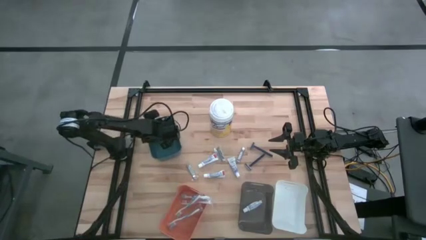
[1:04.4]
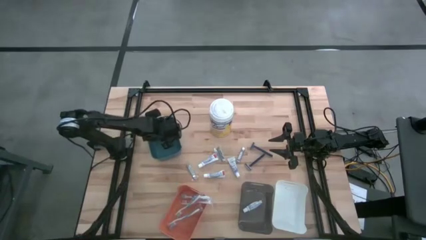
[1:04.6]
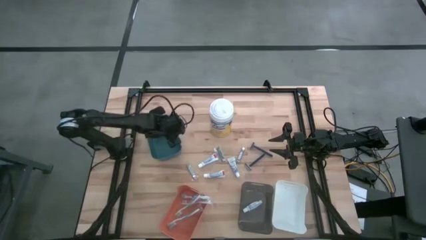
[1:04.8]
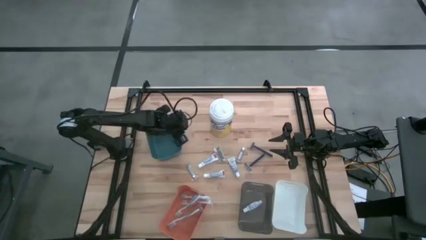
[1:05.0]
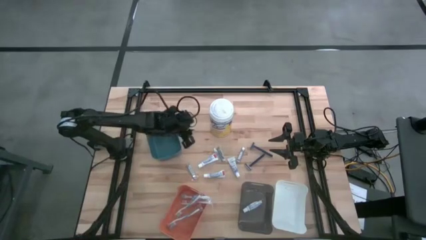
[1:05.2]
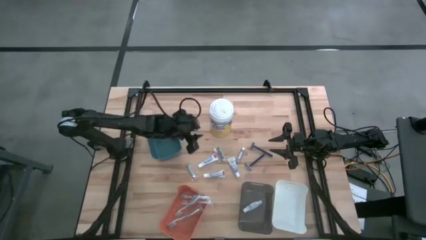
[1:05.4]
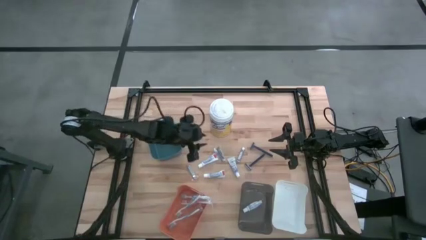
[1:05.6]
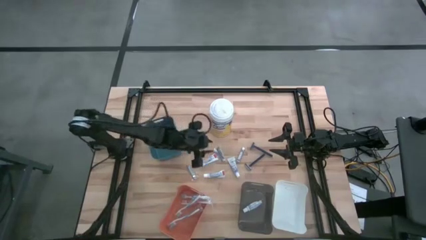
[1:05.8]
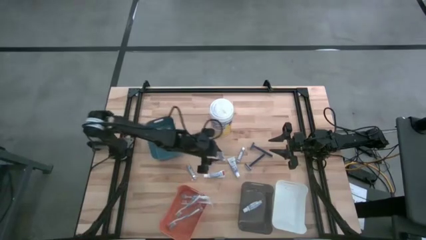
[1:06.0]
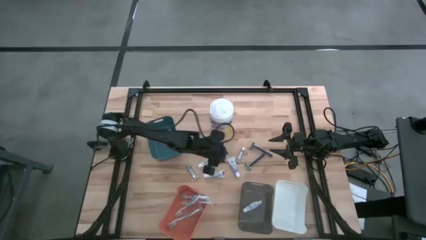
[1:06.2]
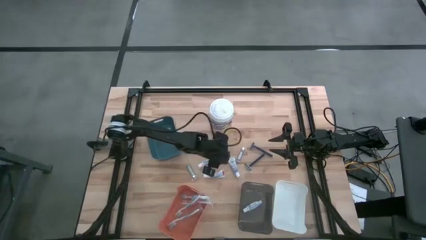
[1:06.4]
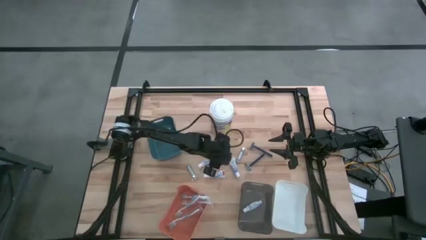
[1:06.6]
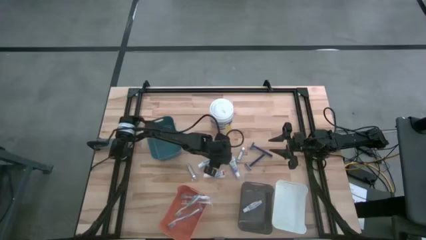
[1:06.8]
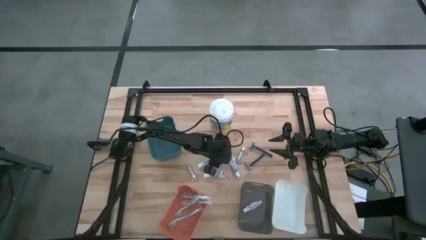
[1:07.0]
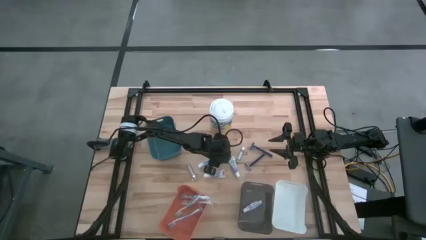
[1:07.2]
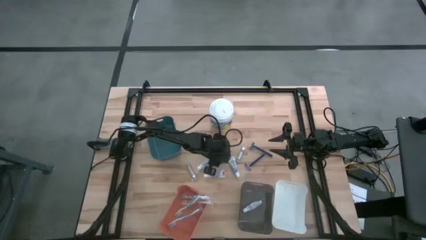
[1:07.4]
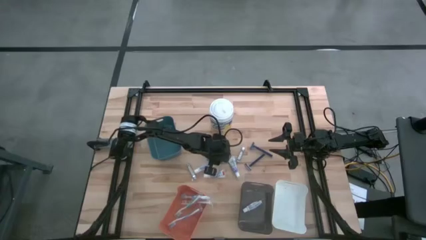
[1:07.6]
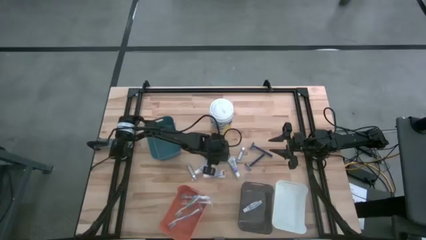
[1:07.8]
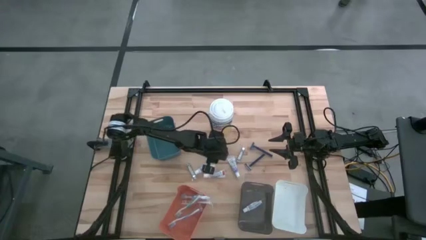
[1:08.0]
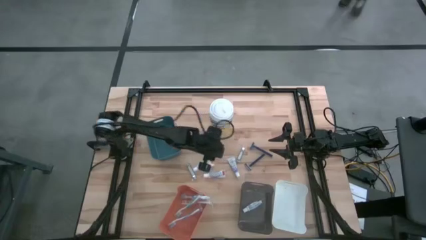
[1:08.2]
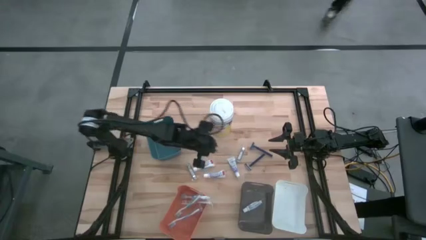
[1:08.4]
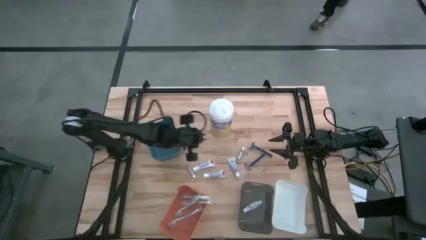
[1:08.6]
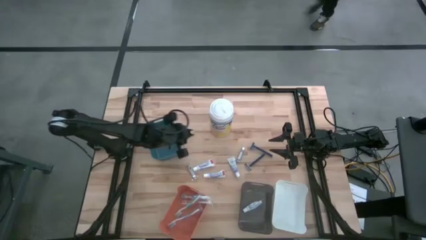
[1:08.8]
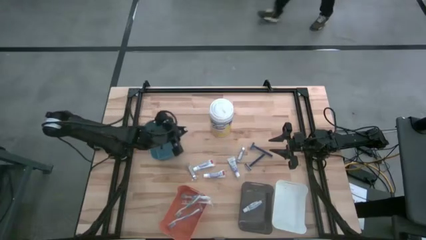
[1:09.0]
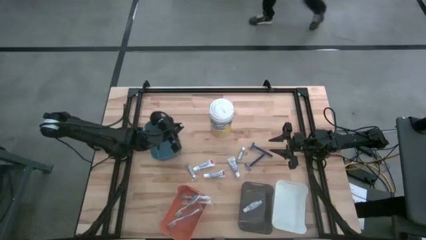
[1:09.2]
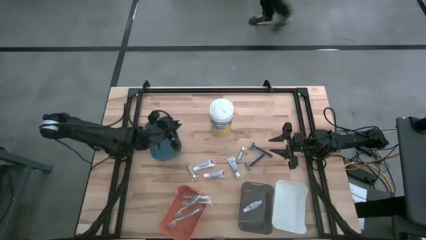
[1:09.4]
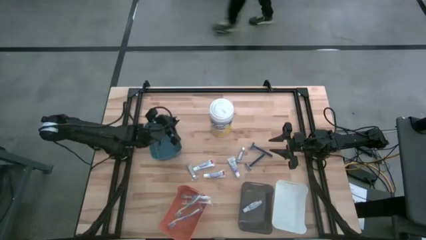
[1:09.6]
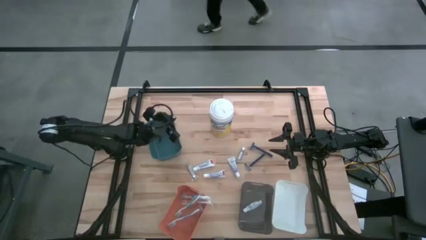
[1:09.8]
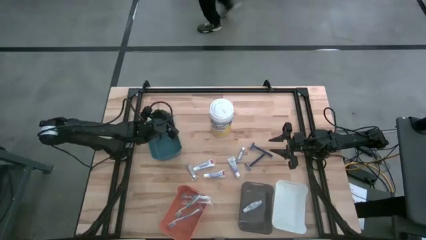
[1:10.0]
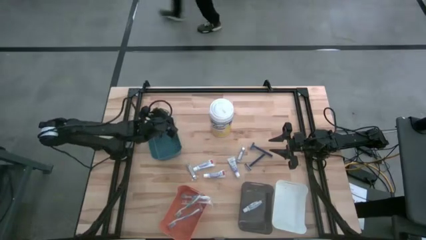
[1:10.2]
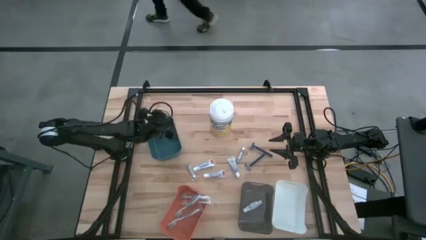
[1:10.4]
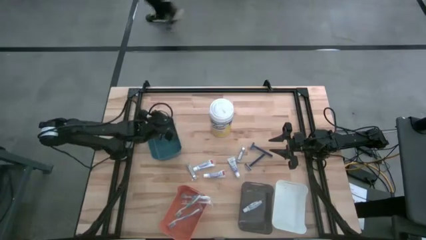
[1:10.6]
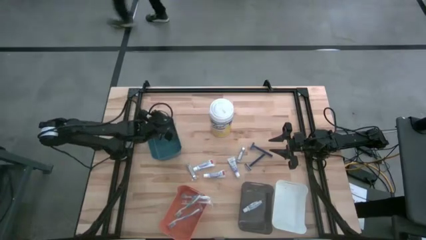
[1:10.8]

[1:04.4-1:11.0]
Task: Pick & Place Travel size toiletries
Put the silver nail cutter into the blue bin

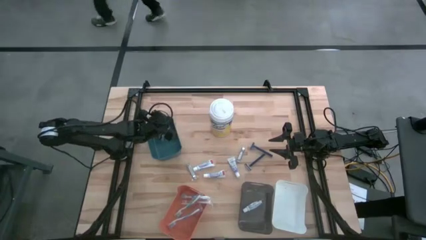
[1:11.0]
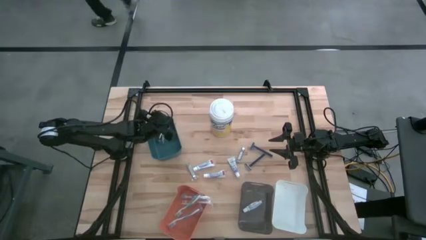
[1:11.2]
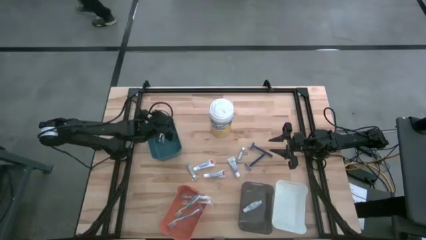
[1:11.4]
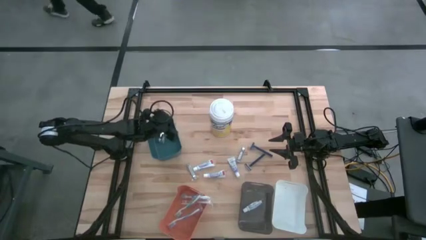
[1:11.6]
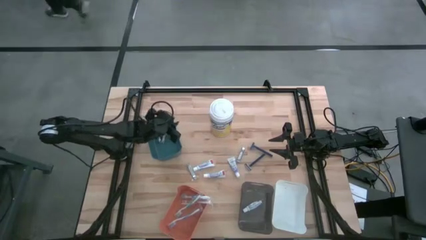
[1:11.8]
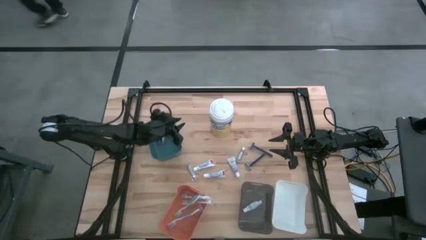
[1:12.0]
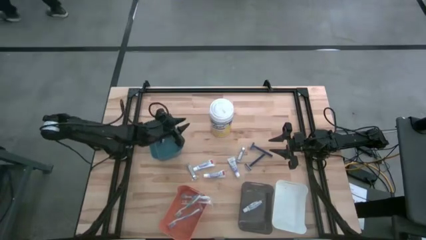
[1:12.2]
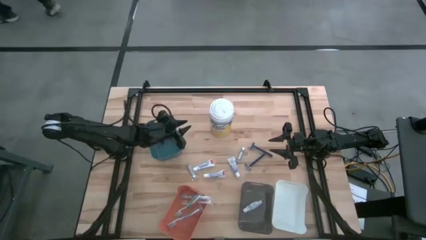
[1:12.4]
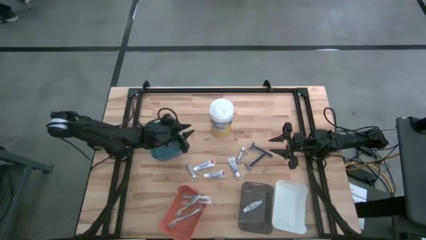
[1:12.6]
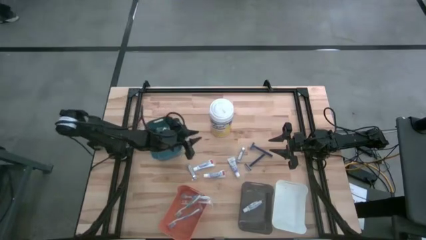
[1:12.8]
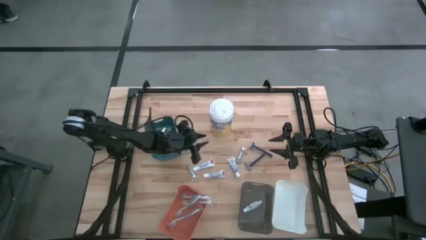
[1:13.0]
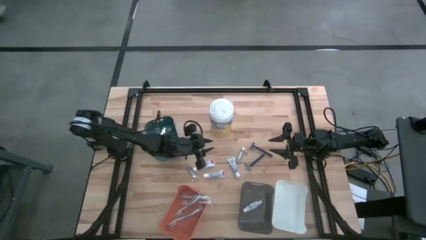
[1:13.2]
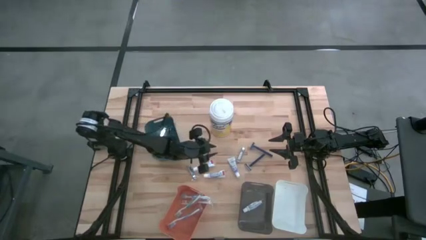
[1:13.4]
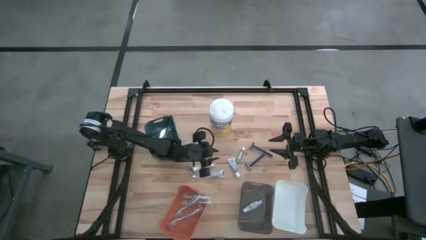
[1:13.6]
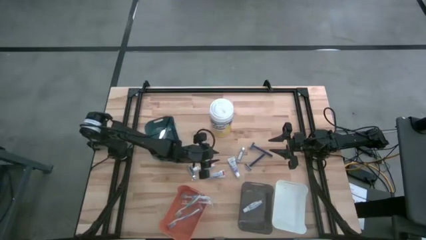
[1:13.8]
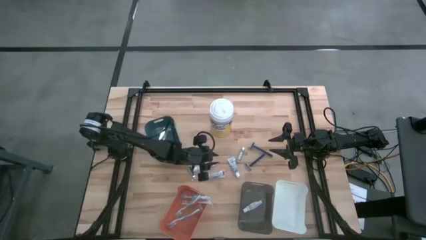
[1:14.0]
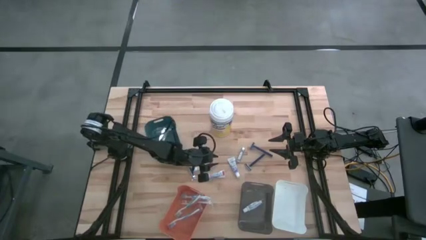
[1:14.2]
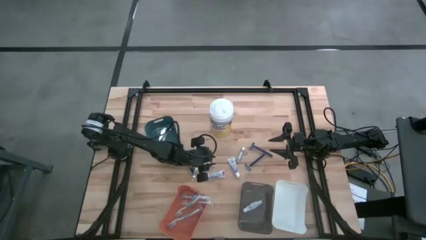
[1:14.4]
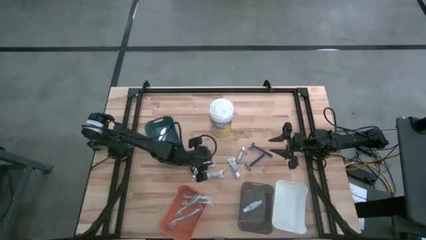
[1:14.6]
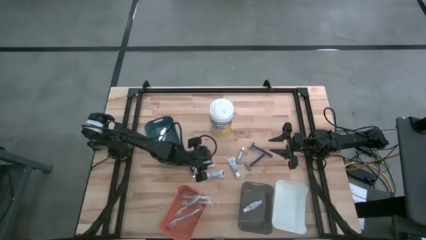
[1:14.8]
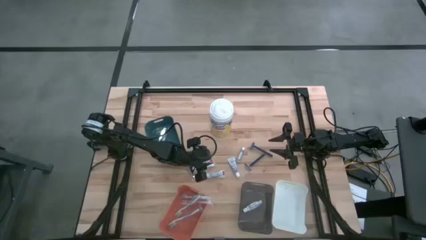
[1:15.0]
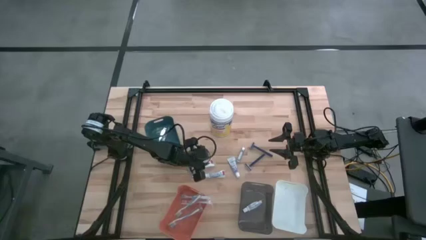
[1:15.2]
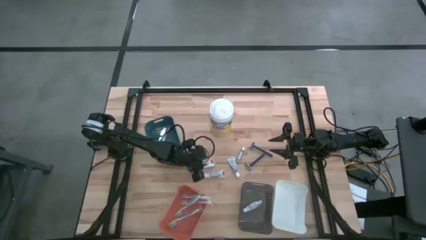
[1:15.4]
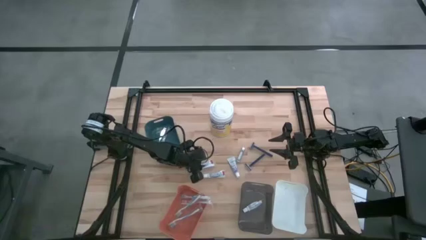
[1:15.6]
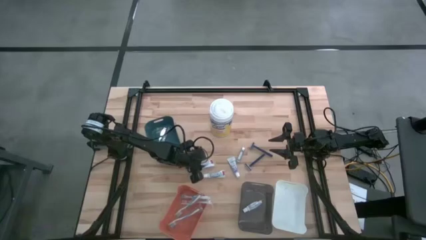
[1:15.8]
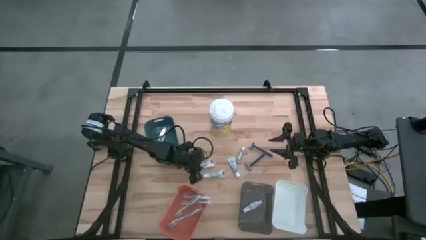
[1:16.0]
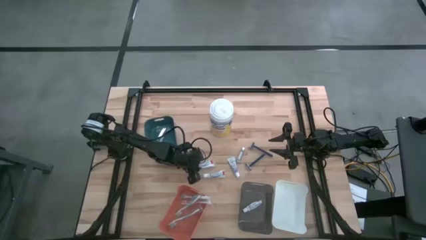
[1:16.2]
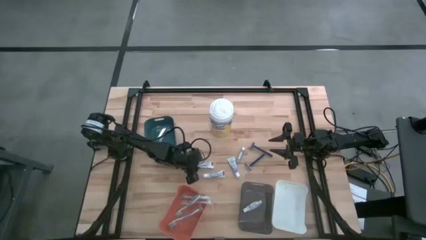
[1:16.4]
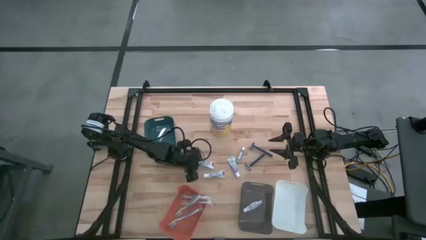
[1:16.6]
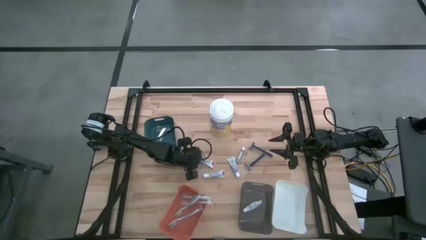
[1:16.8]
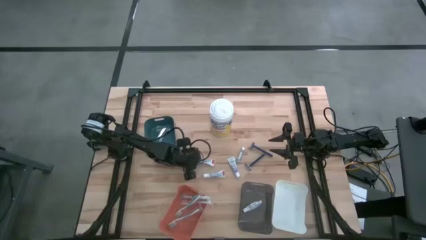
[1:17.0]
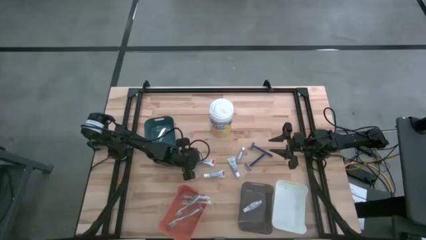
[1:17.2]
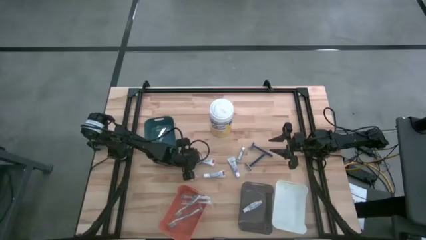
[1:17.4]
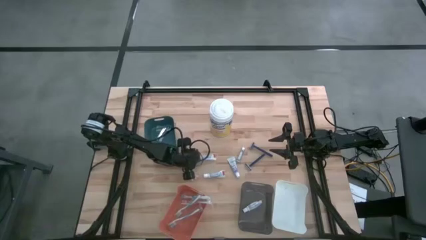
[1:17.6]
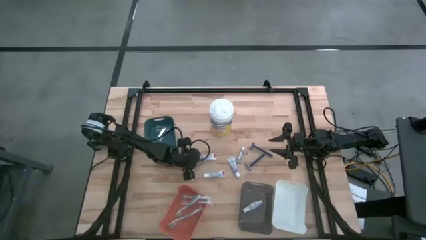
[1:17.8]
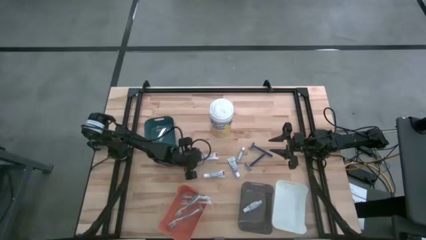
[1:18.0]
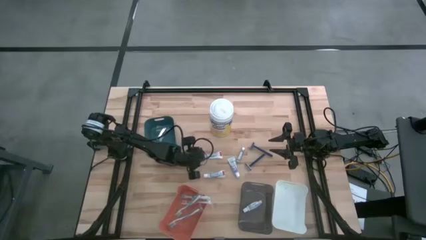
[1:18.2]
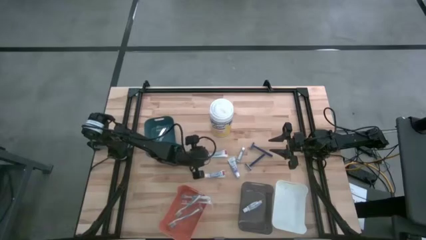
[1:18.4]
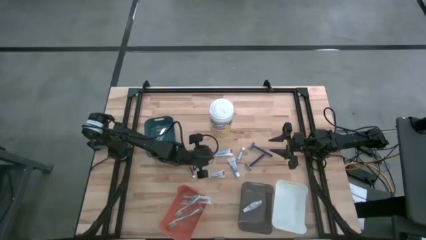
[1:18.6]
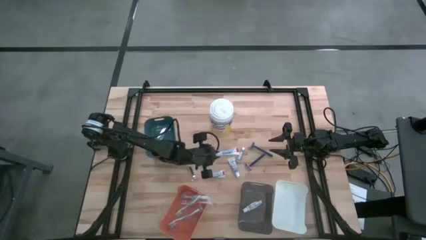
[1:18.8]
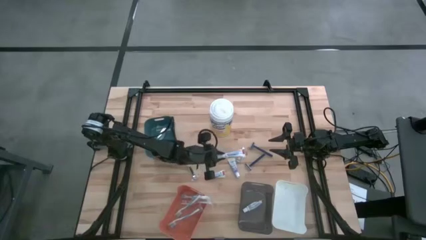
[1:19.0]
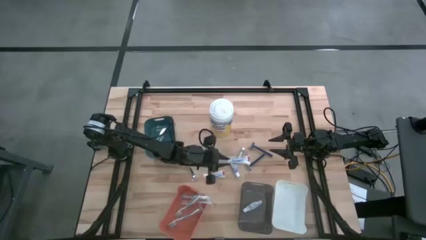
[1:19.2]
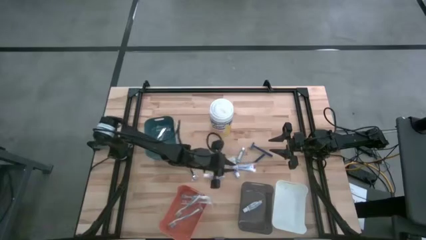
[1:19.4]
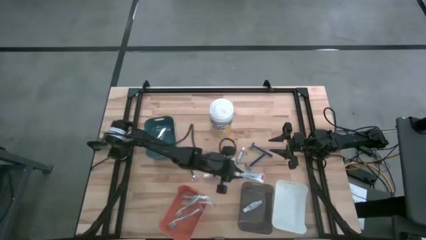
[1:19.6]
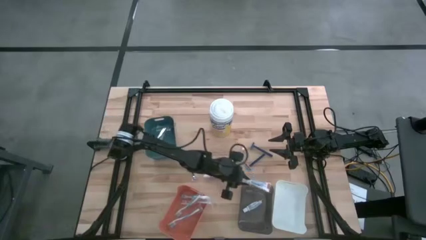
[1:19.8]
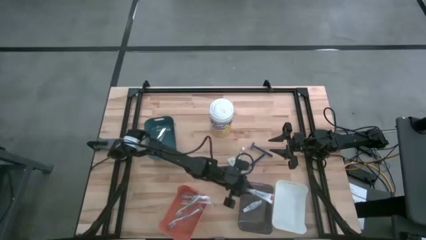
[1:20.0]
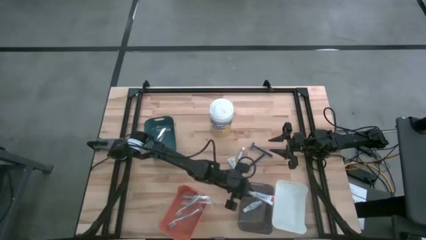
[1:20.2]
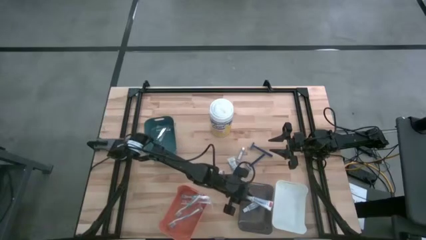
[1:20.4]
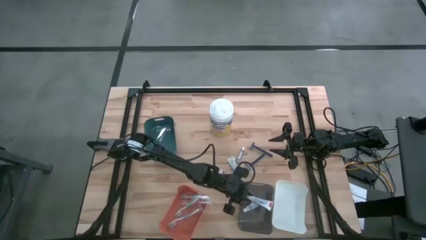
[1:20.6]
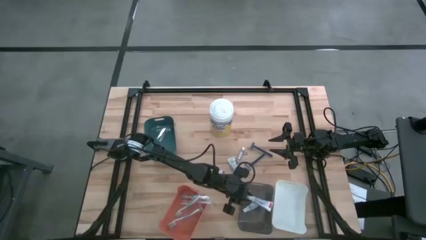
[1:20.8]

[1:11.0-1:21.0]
Put the white toothpaste into the black bin
